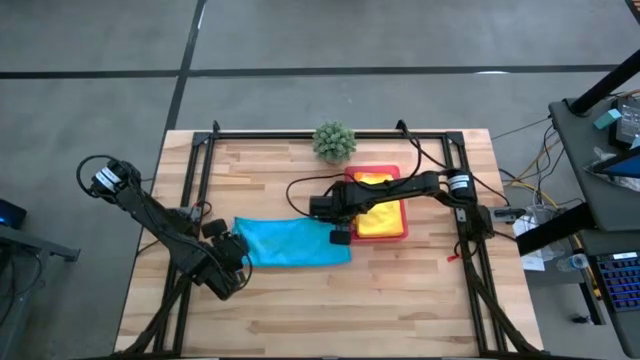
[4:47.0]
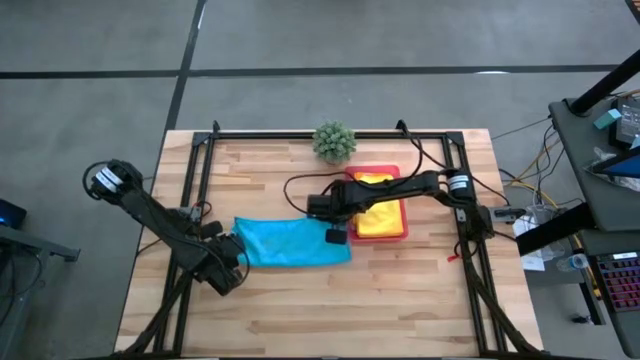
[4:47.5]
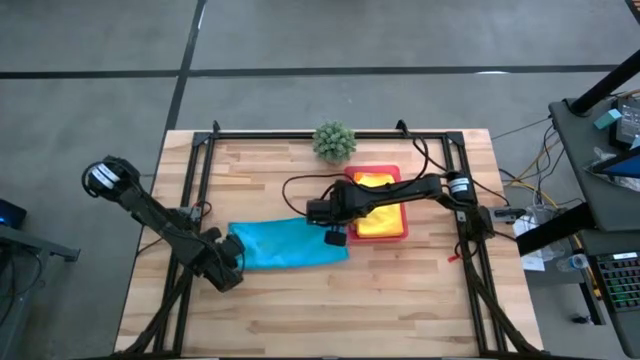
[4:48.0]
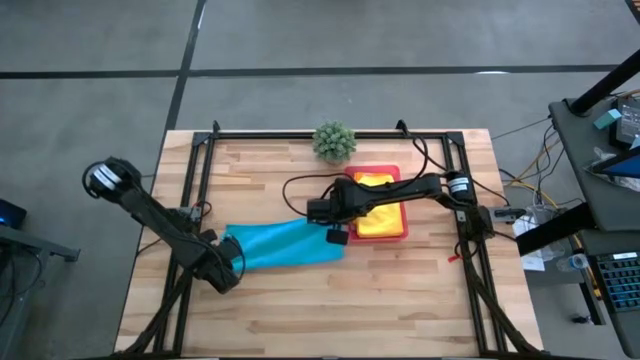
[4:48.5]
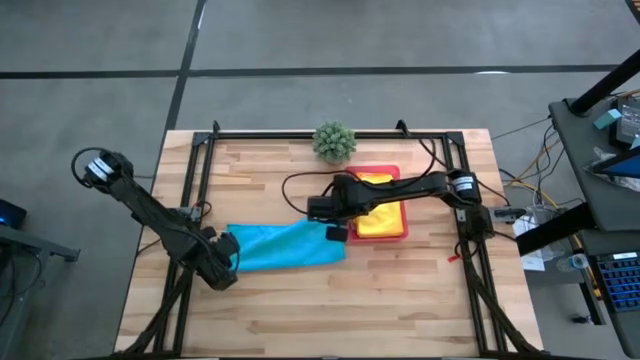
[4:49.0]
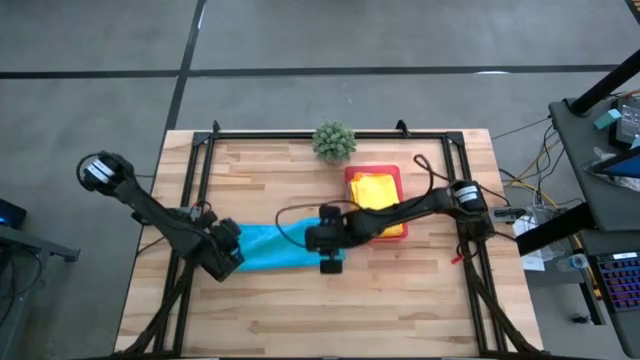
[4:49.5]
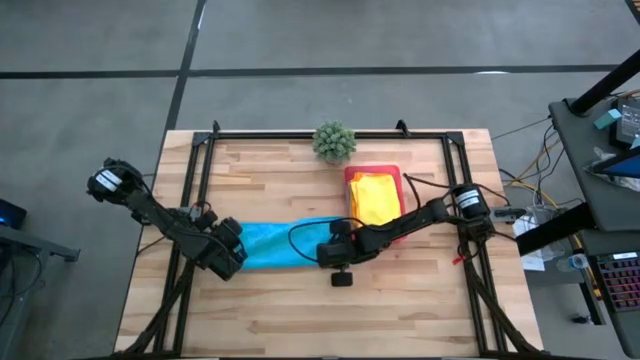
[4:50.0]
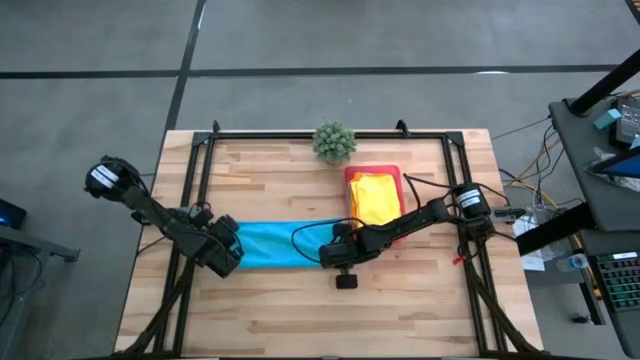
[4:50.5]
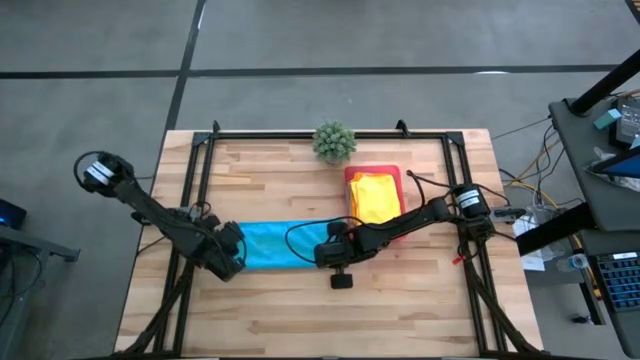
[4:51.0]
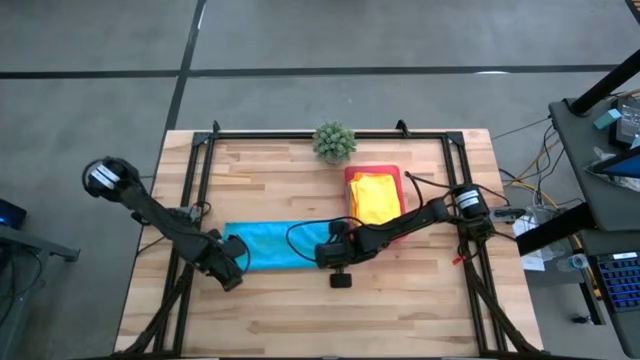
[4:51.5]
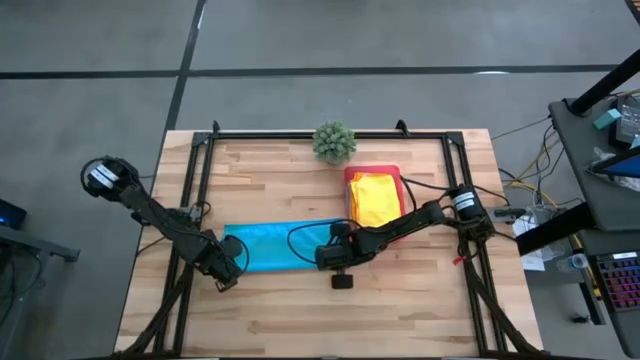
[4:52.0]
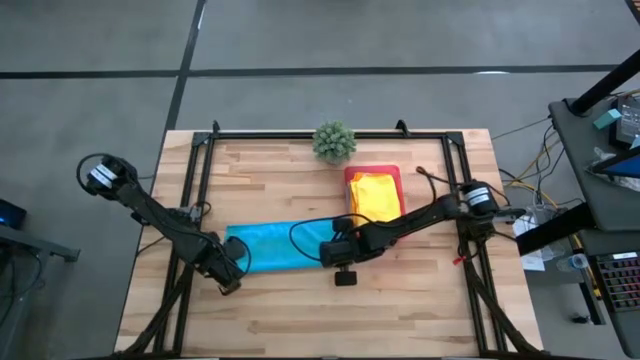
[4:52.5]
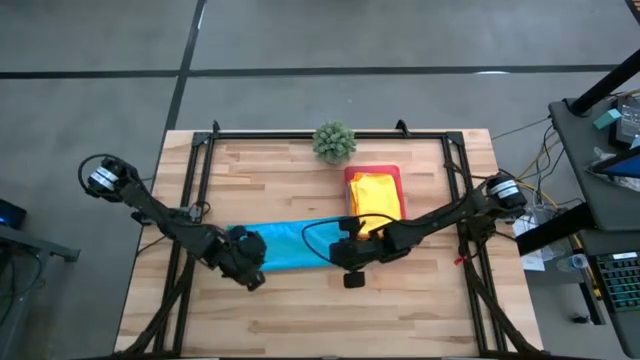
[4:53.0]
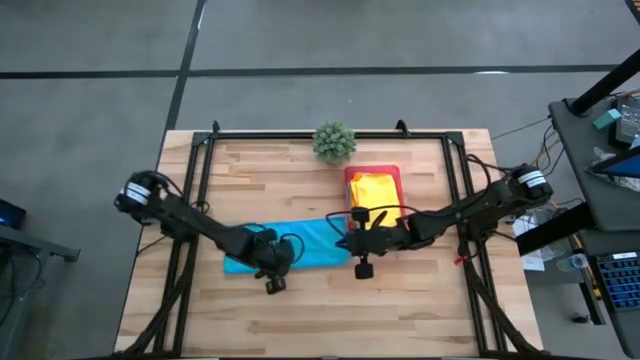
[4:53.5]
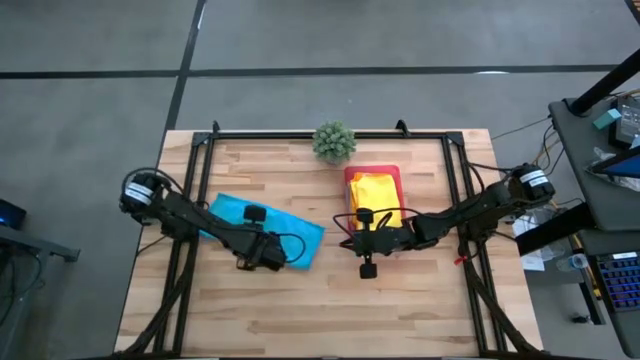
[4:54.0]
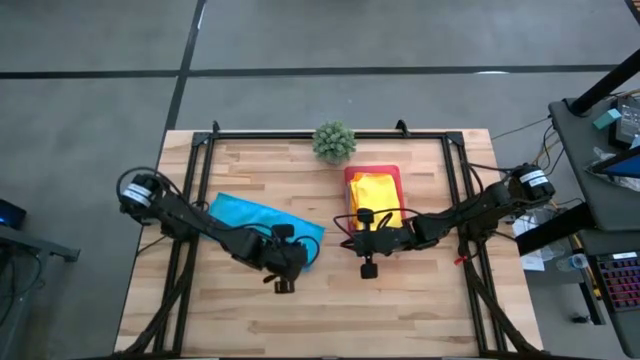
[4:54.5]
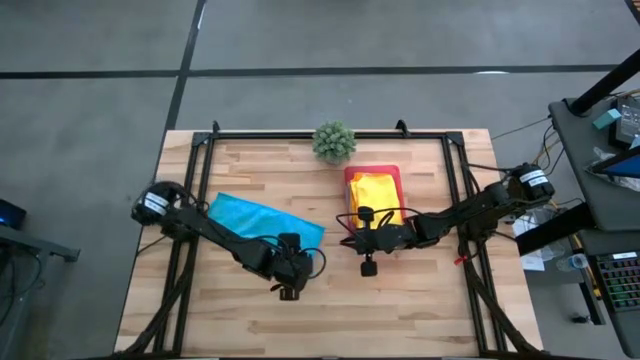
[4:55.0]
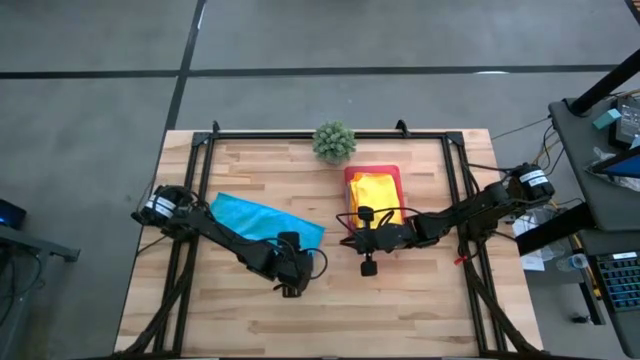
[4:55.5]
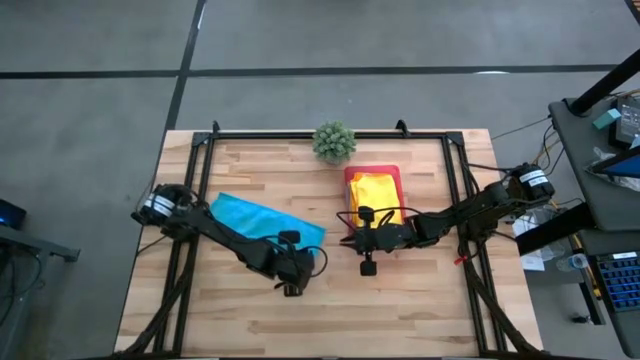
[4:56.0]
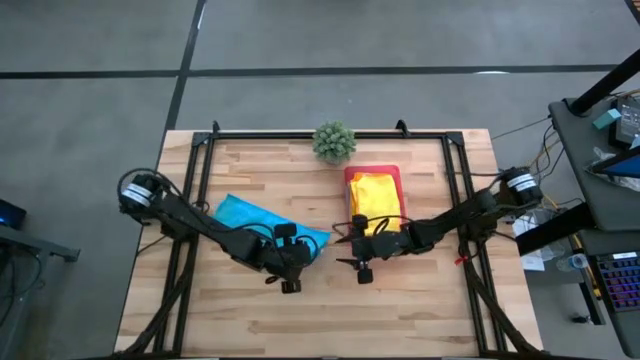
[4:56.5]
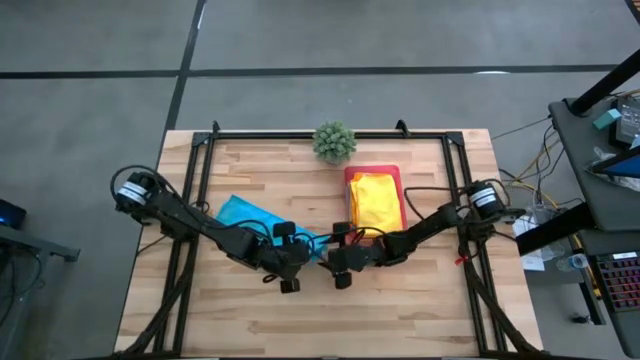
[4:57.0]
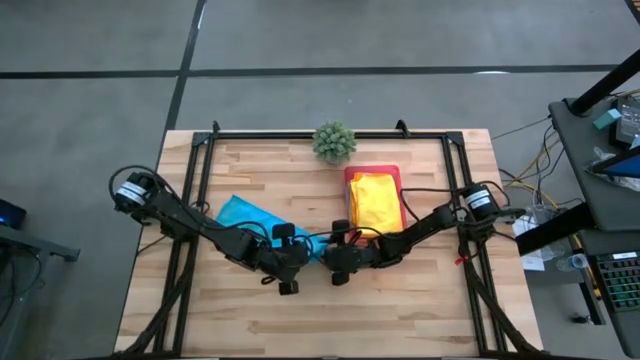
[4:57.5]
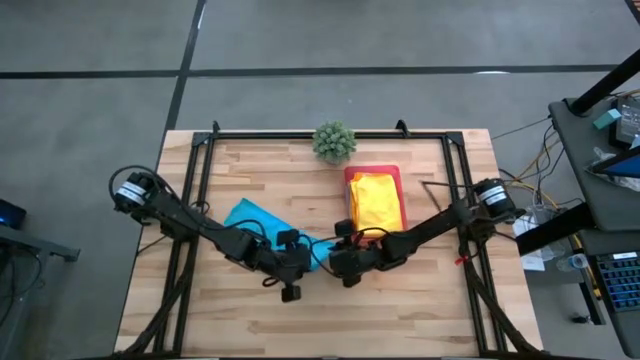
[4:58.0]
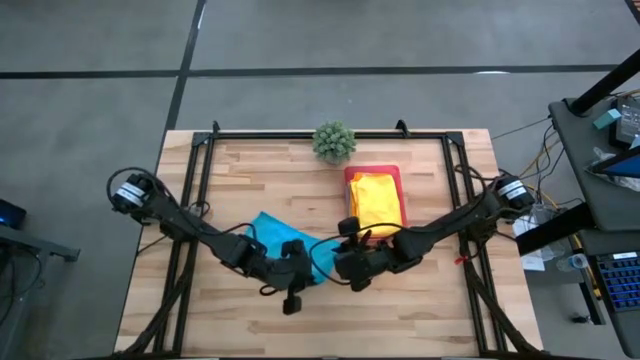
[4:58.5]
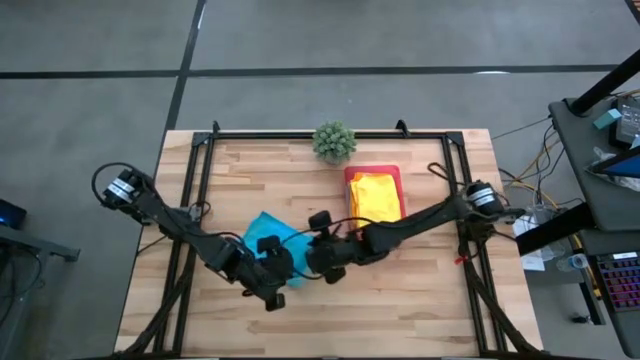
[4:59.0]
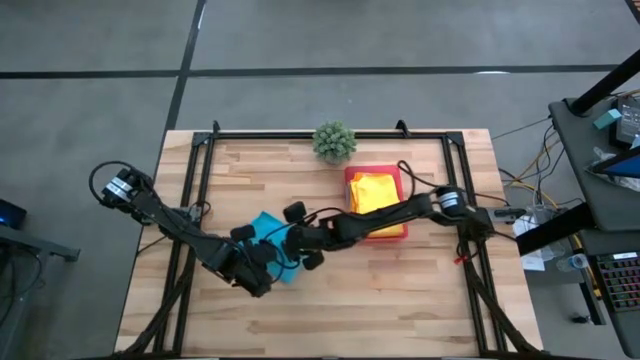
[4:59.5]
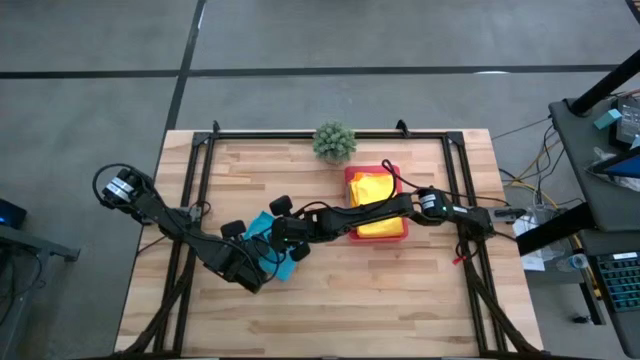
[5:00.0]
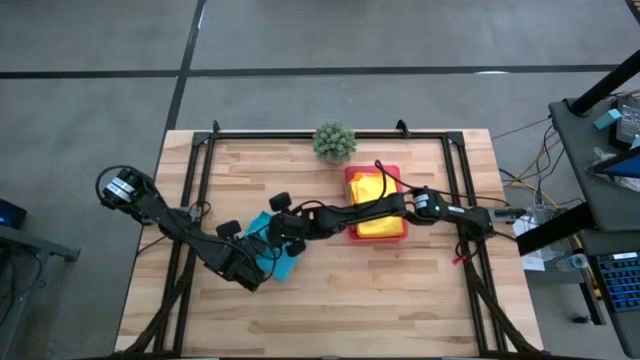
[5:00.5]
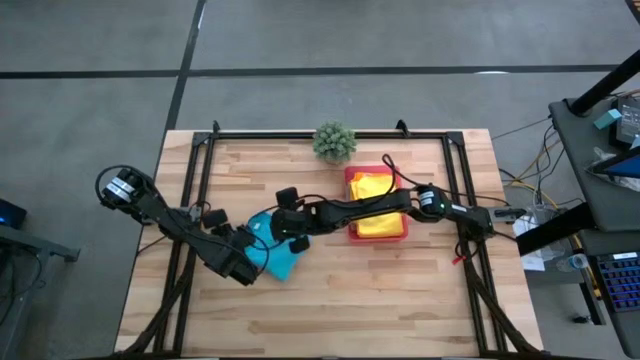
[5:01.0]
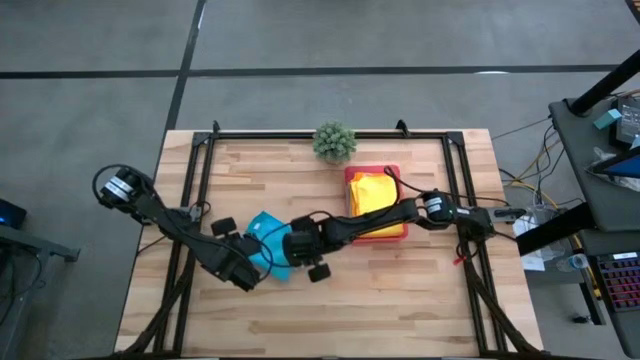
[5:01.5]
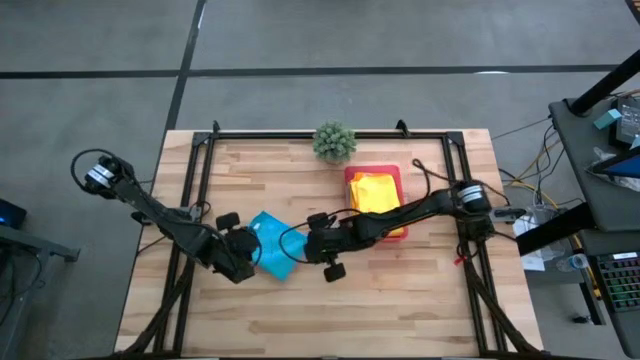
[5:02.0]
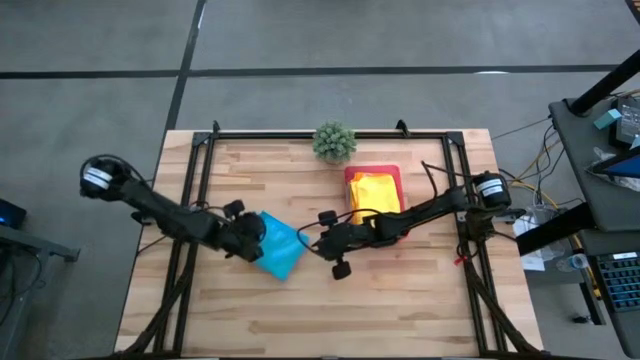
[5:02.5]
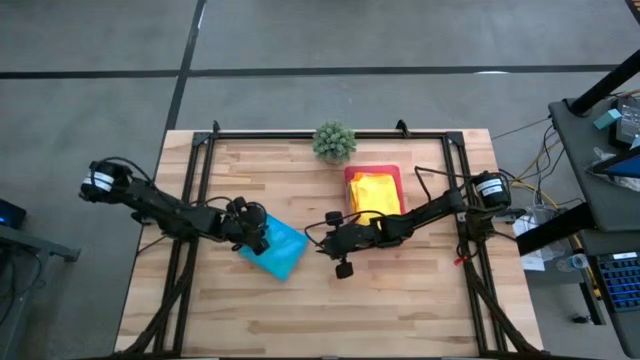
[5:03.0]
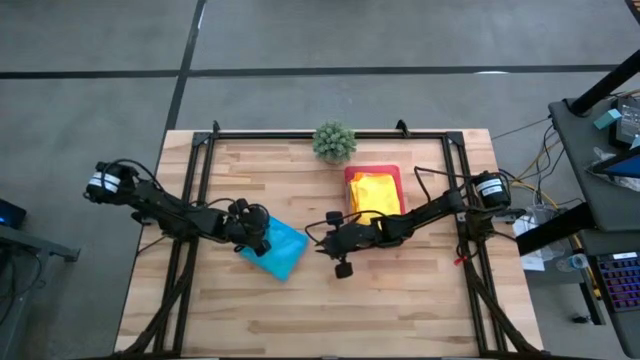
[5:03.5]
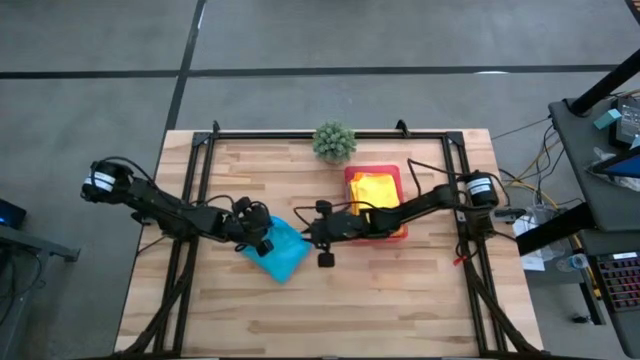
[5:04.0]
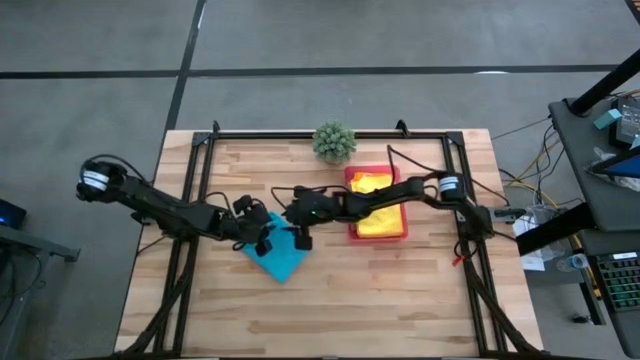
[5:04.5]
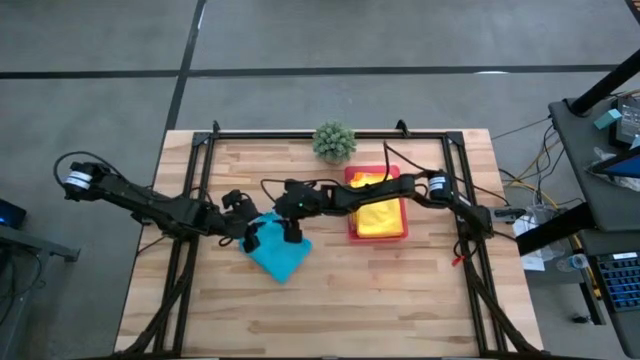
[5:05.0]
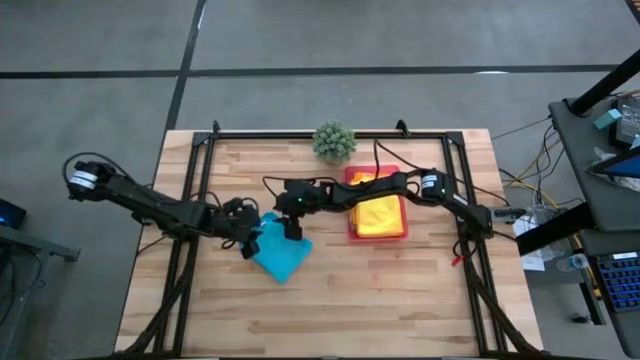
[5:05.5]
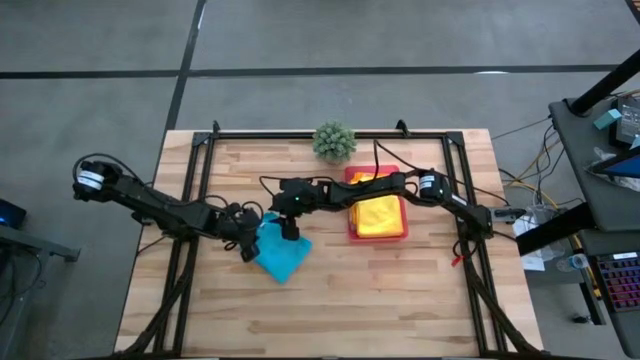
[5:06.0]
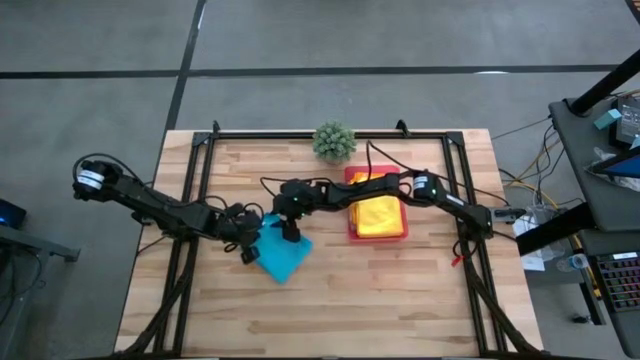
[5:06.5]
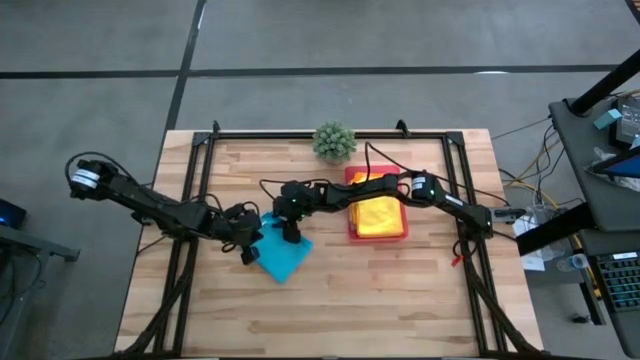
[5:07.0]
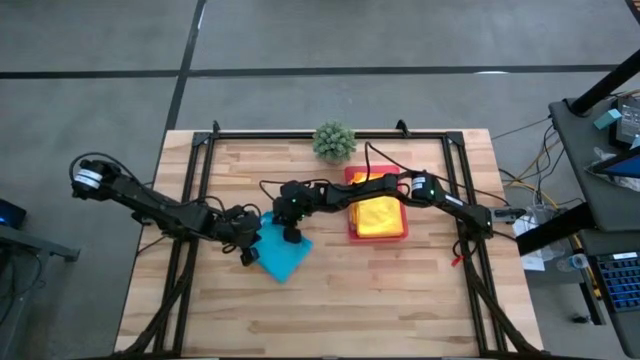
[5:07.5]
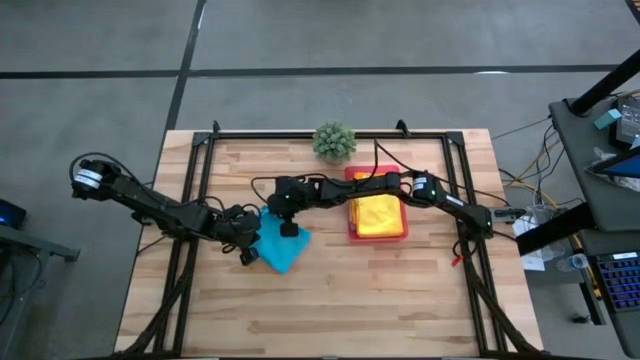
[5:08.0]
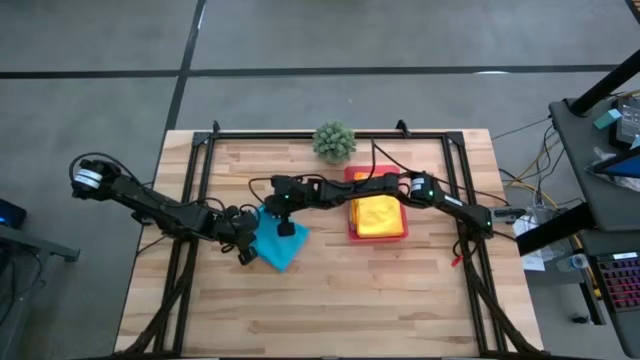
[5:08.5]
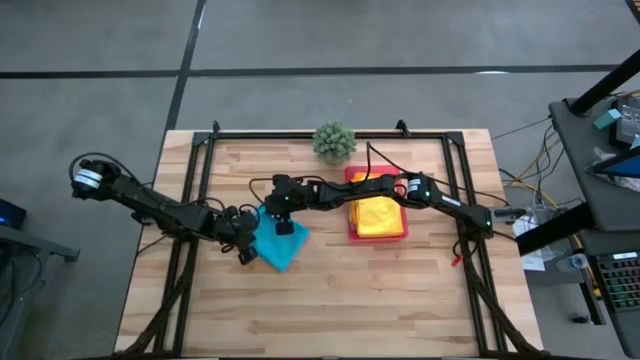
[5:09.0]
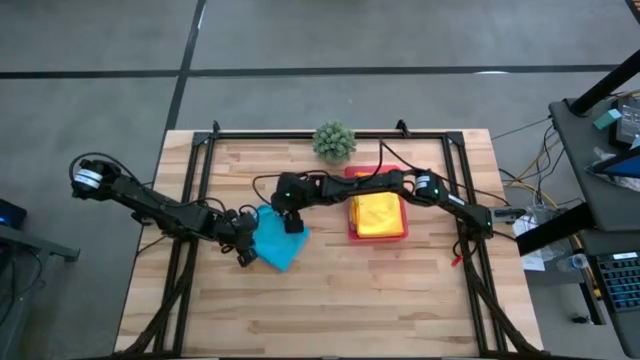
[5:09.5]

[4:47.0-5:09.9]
Task: Fold microfiber towels
Fold the blue towel
